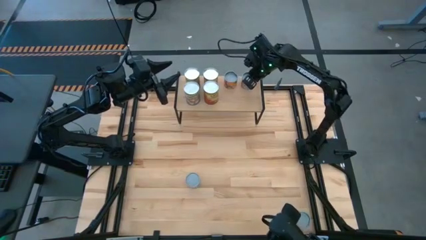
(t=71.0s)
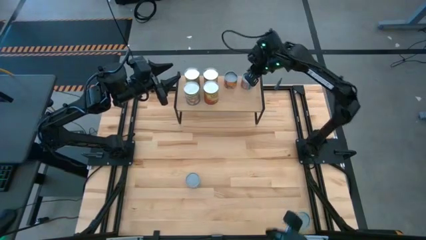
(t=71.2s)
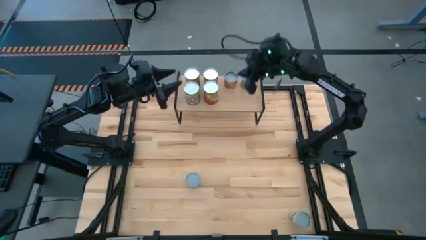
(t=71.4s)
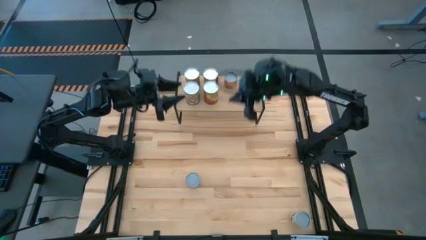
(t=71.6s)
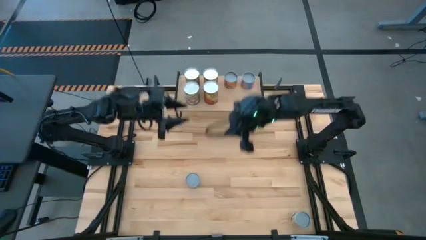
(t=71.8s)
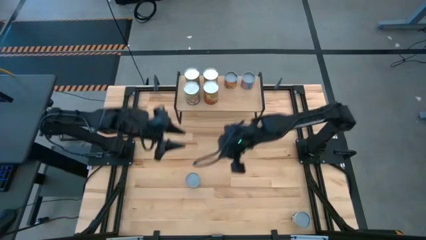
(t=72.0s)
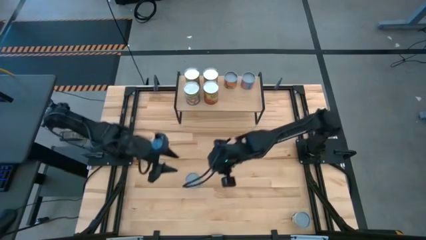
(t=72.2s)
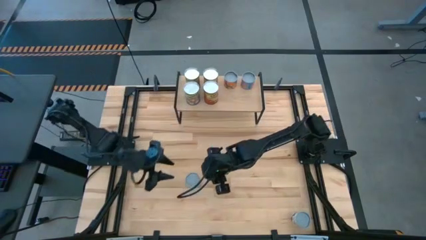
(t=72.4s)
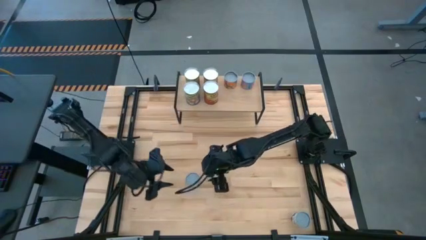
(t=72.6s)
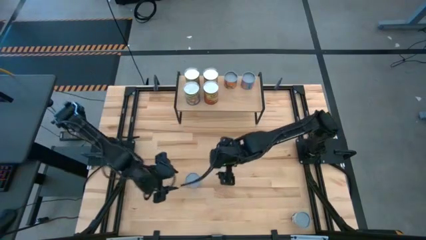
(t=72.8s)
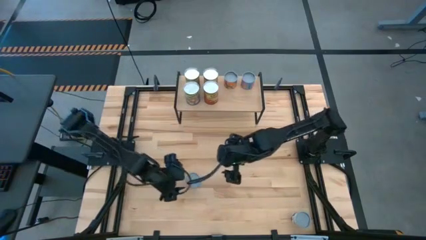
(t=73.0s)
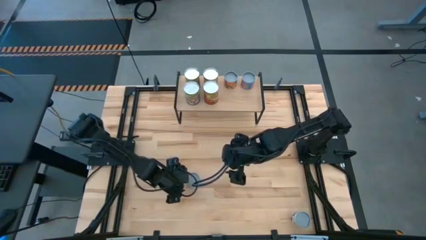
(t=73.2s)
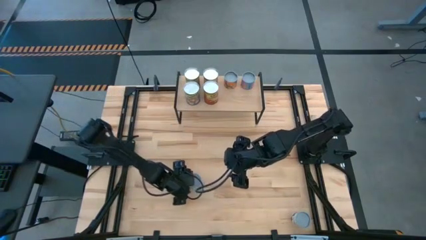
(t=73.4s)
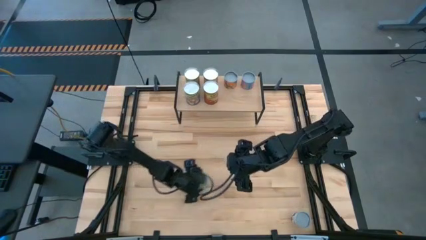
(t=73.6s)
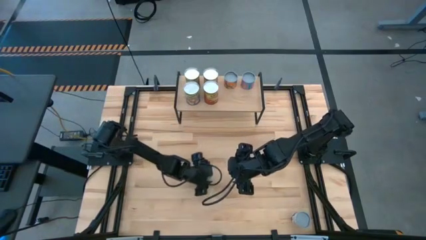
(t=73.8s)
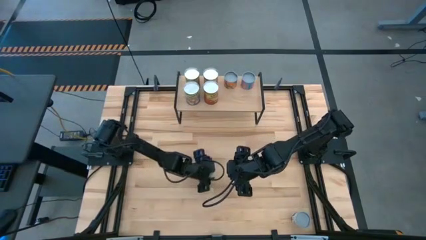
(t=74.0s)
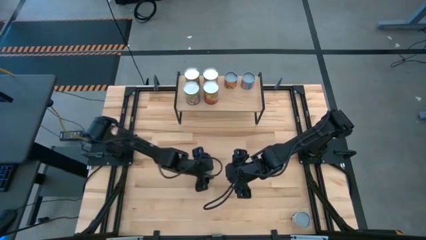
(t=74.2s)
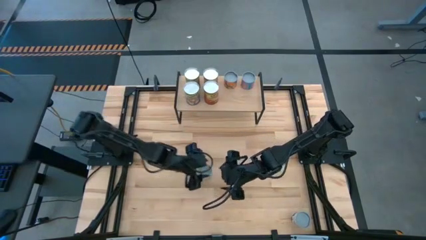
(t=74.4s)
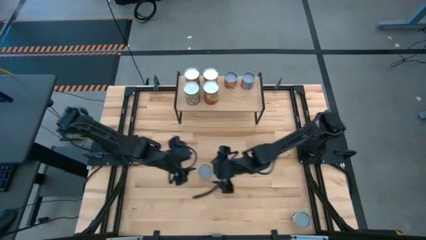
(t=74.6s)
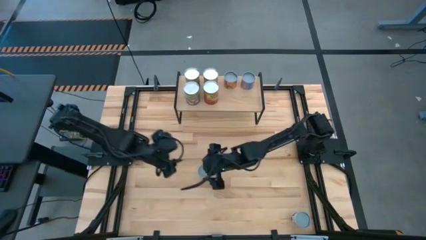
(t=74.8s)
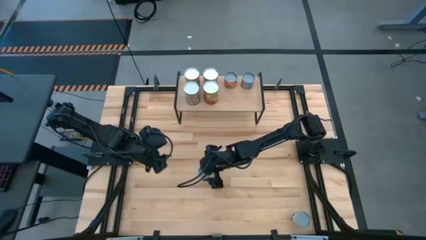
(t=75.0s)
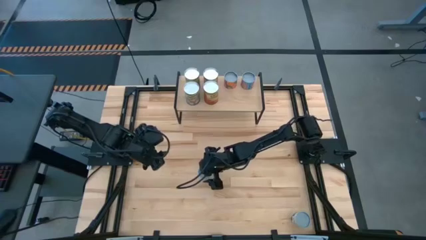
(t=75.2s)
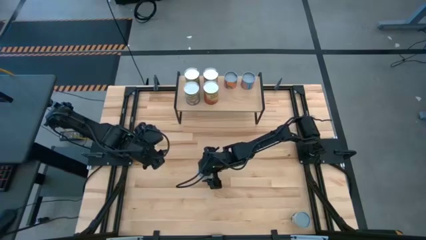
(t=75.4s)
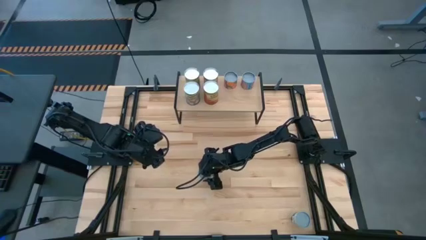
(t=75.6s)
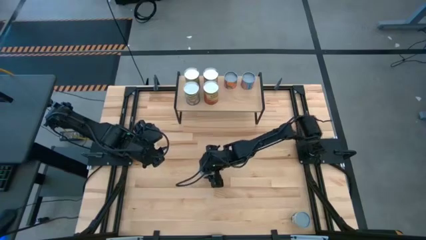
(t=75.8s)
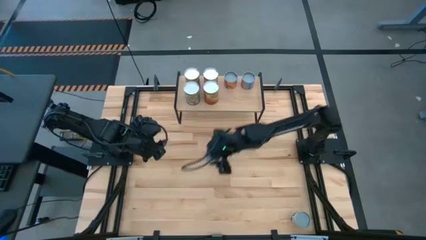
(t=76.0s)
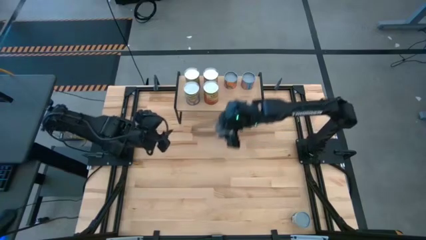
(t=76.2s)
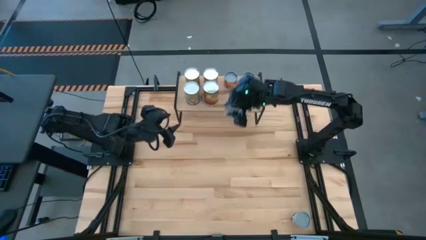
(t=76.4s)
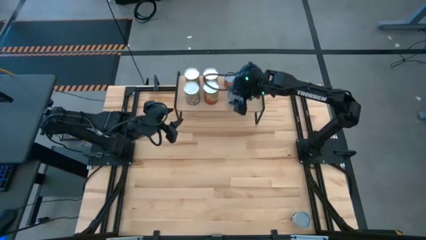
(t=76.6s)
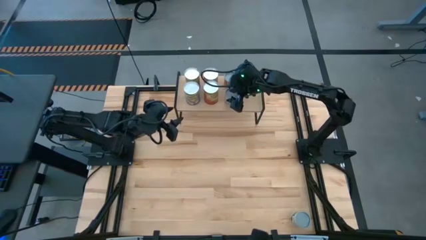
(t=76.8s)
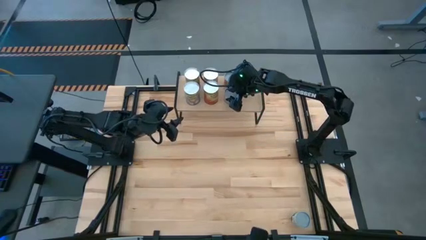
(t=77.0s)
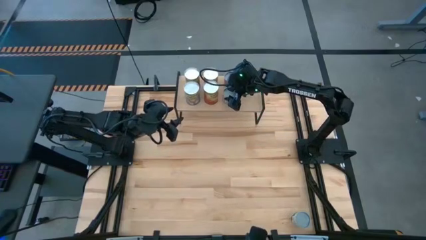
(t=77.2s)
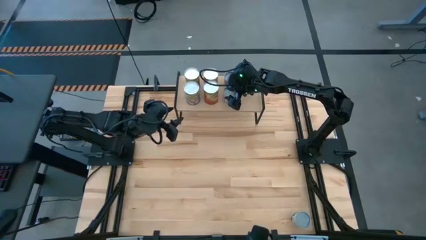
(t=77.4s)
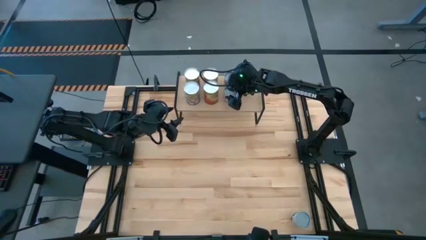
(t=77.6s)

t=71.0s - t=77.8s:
Task: Pick and place cans onto a shelf
Put the canned carrots on the shelf

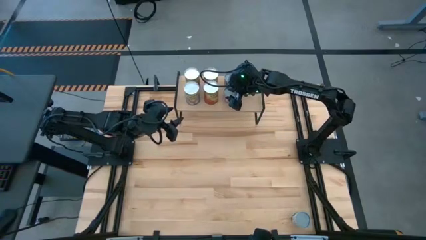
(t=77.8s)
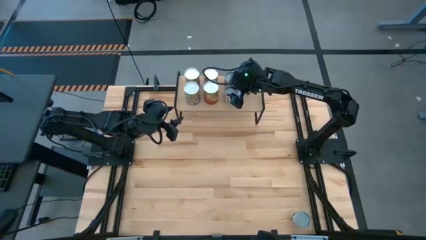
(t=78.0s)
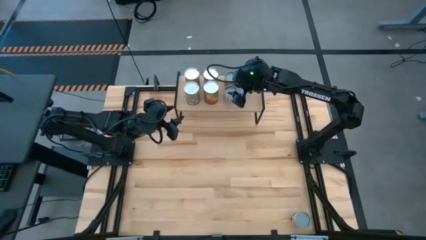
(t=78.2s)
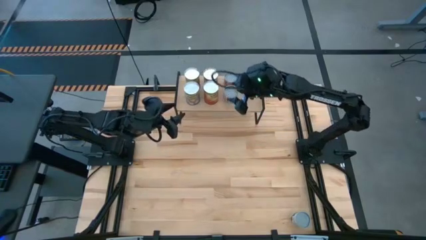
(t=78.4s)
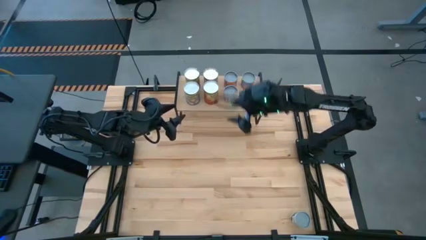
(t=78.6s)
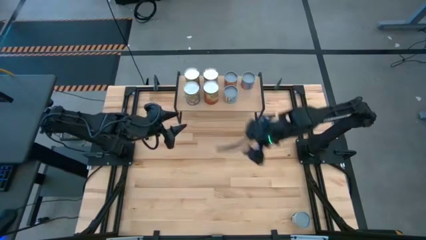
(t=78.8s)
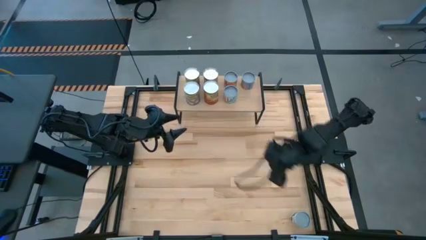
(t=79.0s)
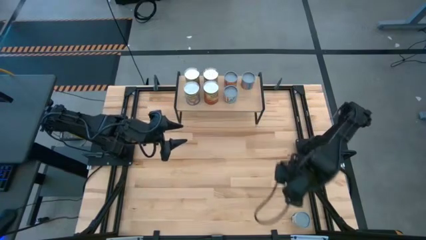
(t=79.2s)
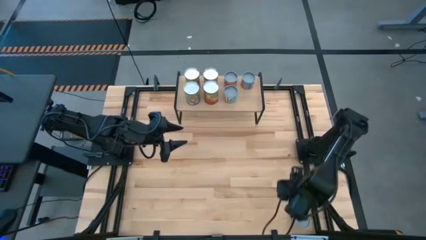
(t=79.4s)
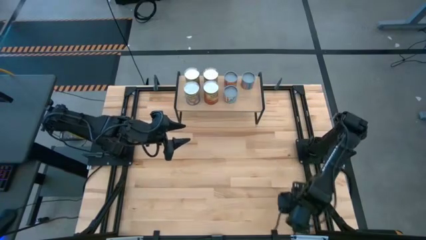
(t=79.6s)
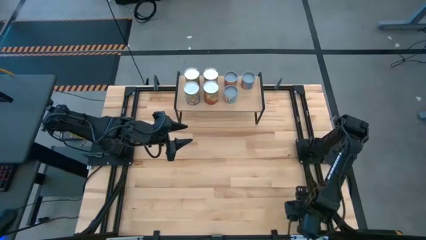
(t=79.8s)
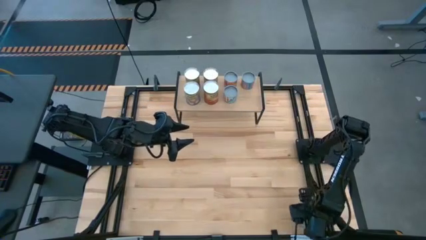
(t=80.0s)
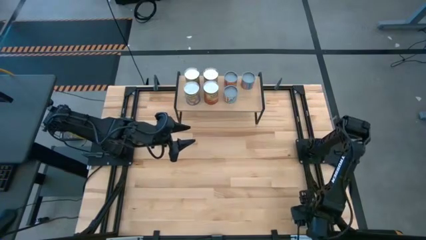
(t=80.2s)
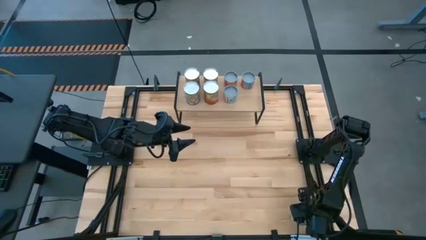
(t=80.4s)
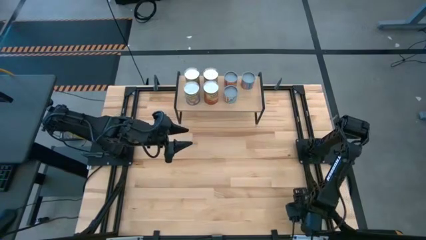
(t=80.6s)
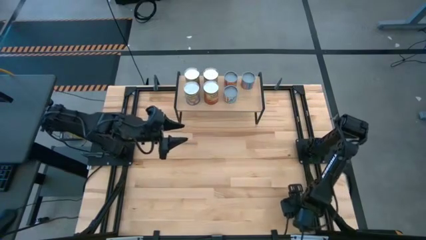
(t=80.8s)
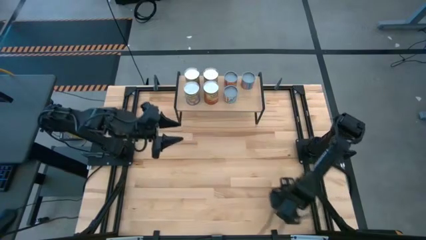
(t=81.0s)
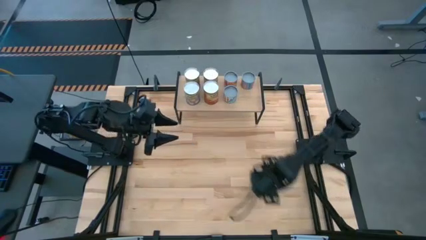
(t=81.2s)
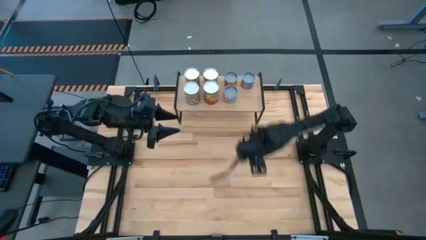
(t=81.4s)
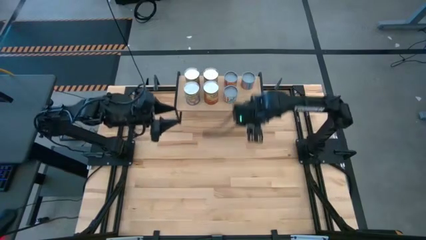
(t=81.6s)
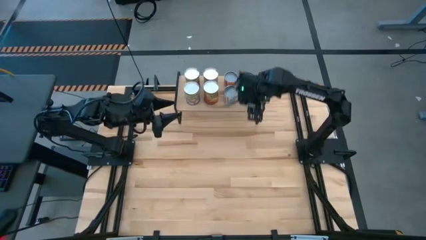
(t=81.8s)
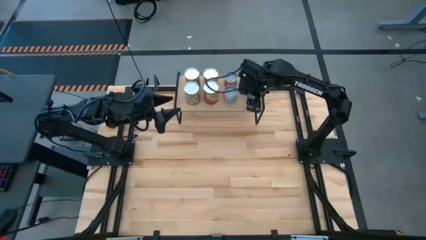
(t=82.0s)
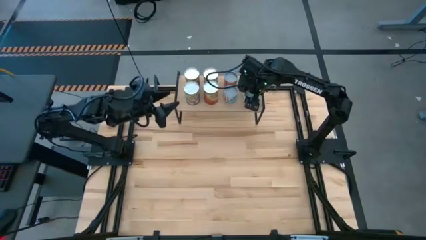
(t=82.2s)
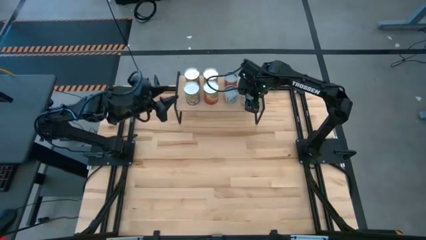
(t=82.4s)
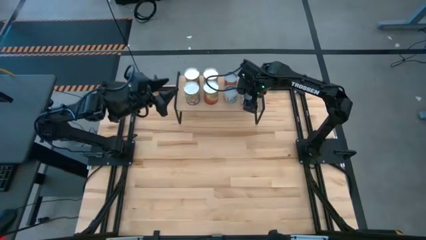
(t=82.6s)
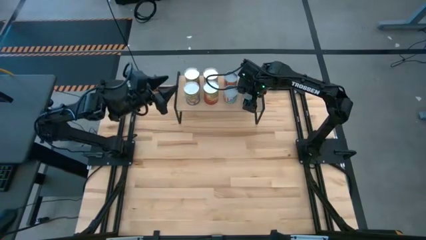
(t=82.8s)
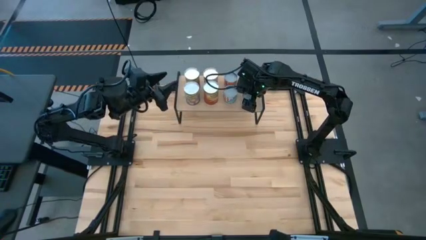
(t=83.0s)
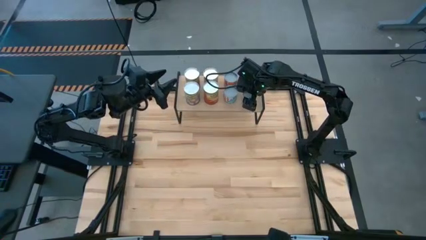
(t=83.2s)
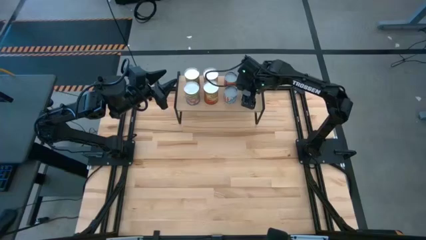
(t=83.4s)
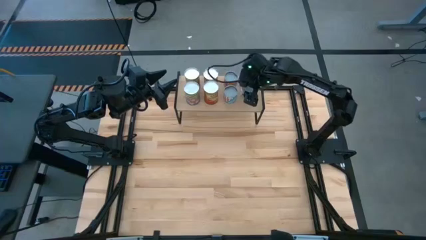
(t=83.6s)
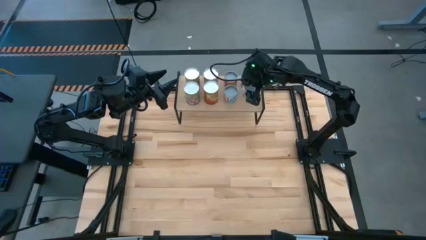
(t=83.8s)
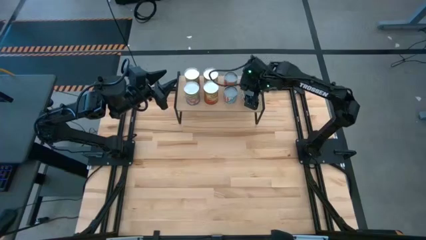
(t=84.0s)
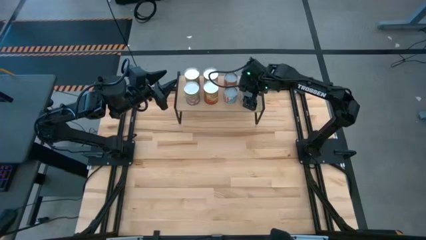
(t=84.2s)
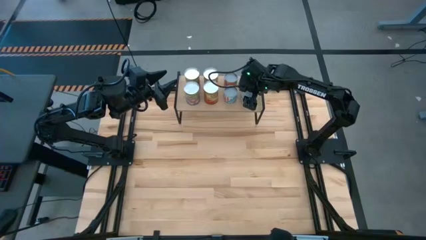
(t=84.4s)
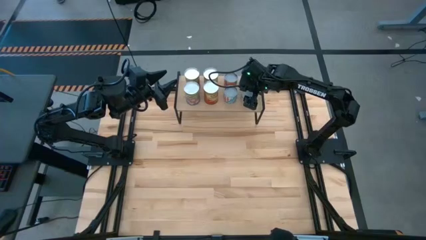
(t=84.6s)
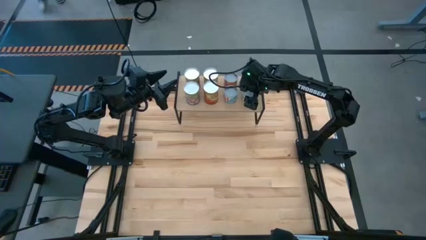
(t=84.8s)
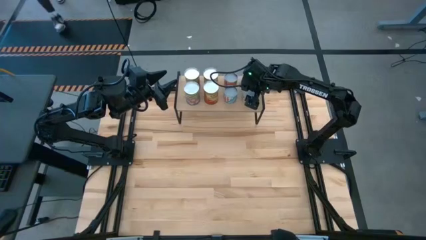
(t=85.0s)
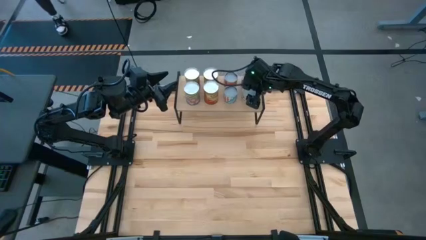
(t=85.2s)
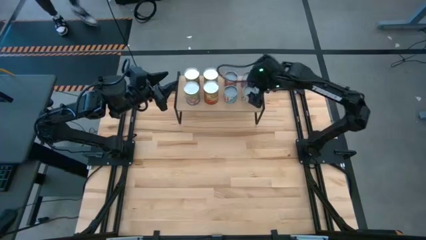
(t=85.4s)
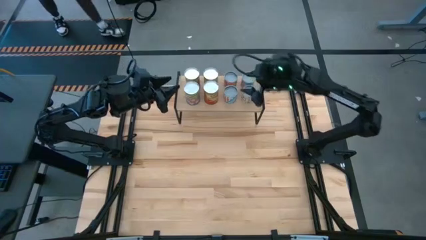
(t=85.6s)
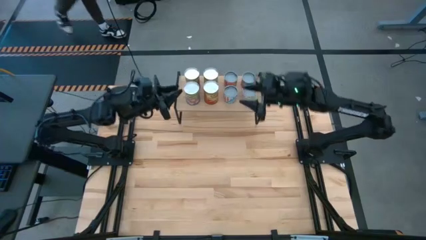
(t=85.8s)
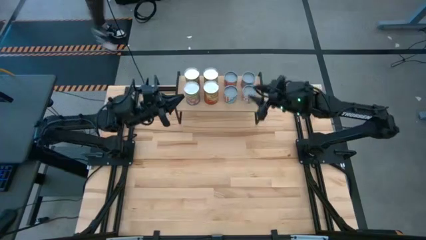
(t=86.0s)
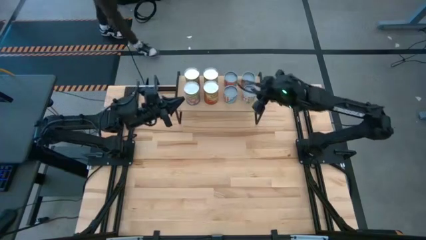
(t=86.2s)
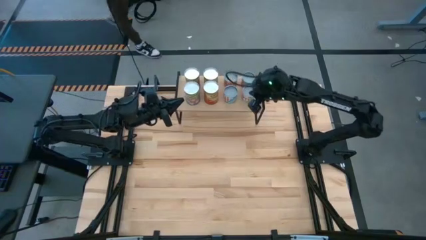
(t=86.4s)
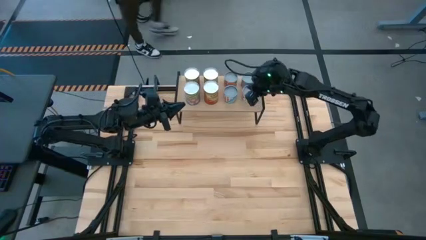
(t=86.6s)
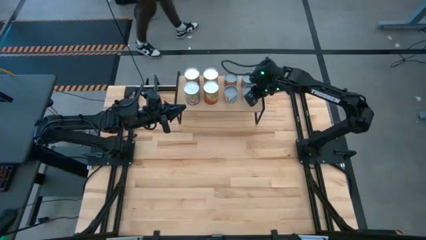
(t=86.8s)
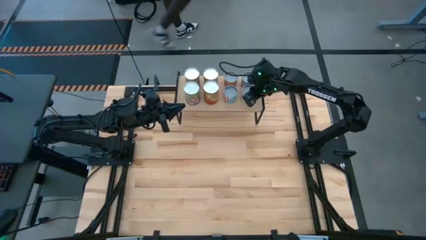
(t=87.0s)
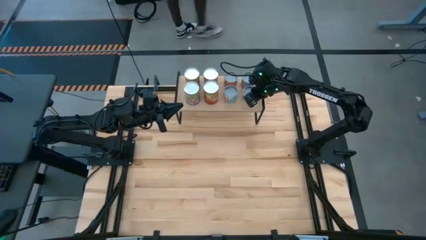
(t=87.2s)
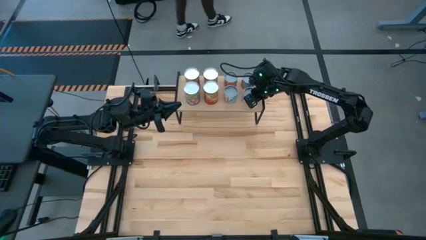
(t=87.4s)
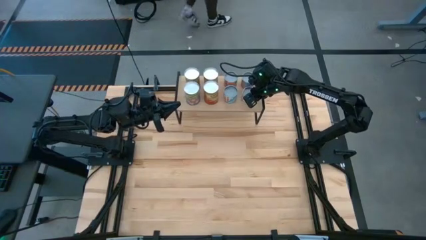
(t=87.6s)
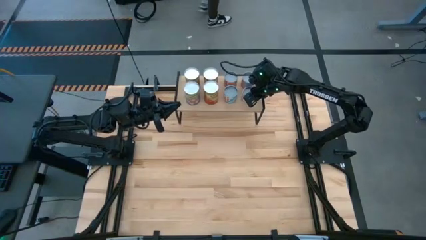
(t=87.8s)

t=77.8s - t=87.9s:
Put the canned peas on the shelf
